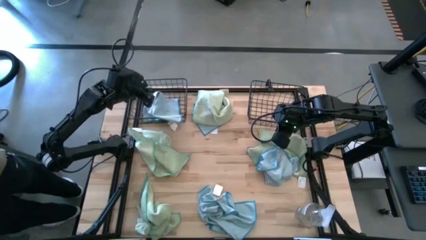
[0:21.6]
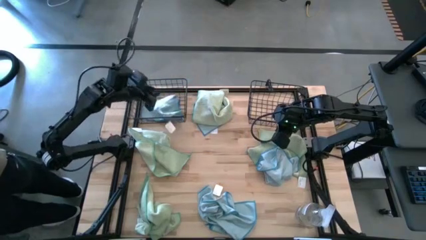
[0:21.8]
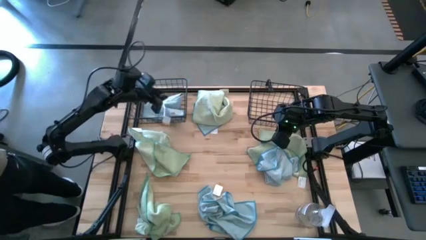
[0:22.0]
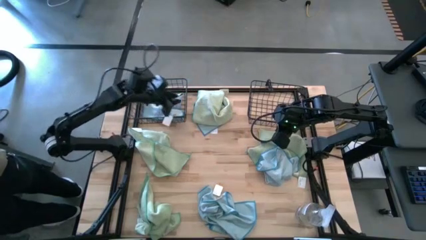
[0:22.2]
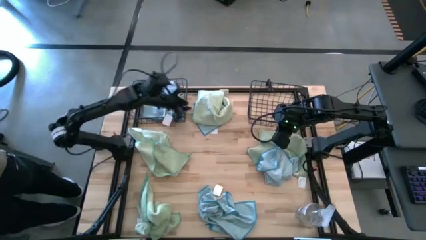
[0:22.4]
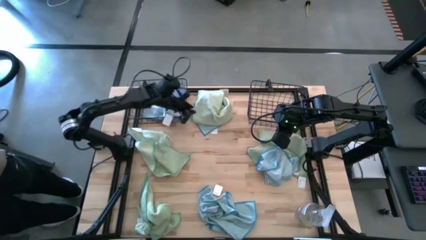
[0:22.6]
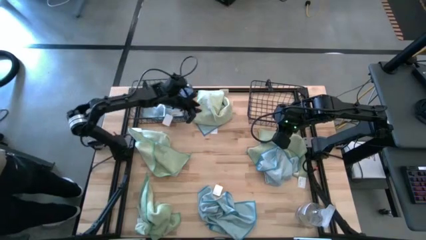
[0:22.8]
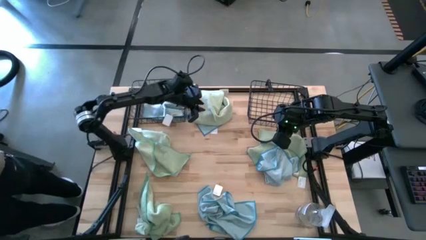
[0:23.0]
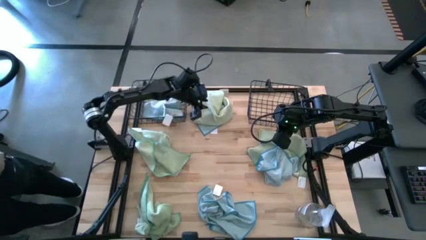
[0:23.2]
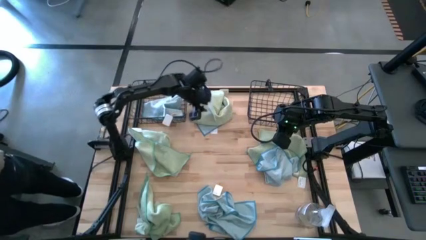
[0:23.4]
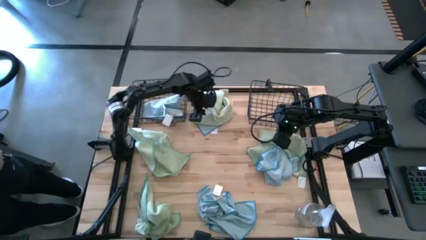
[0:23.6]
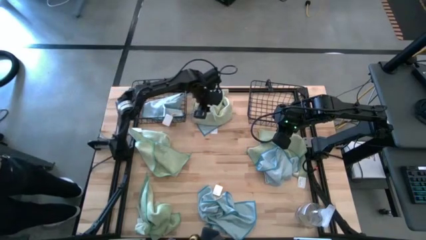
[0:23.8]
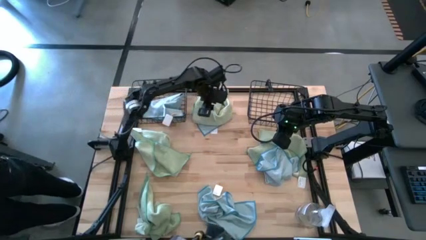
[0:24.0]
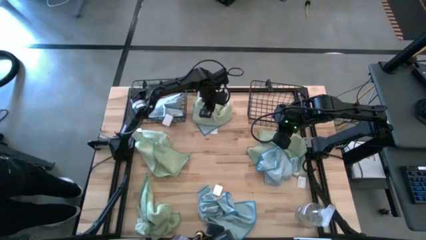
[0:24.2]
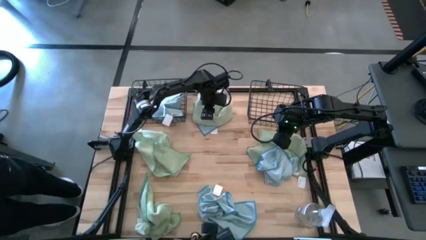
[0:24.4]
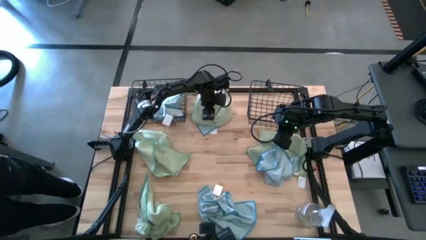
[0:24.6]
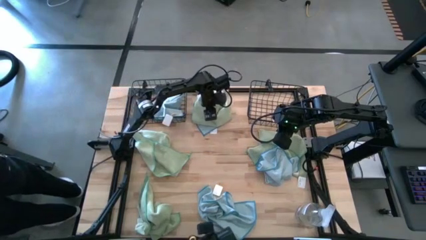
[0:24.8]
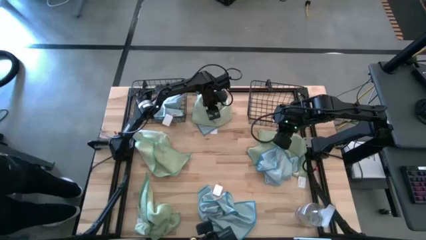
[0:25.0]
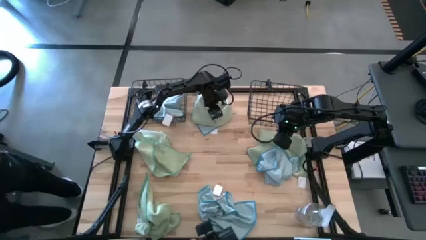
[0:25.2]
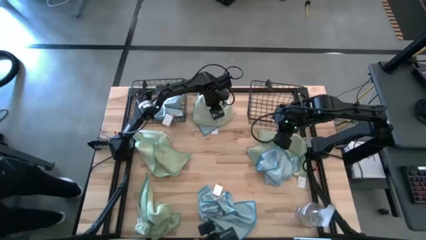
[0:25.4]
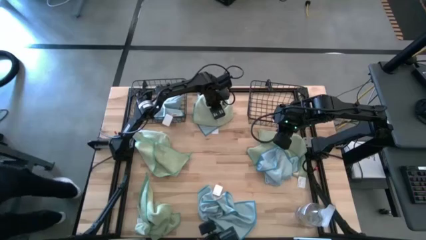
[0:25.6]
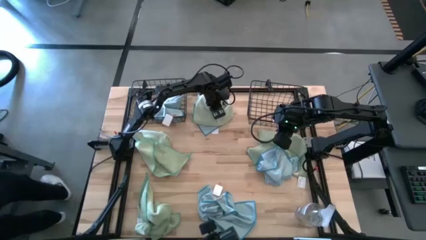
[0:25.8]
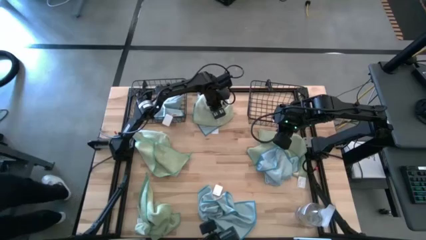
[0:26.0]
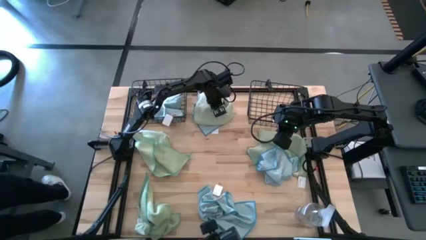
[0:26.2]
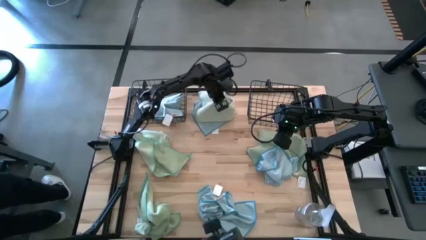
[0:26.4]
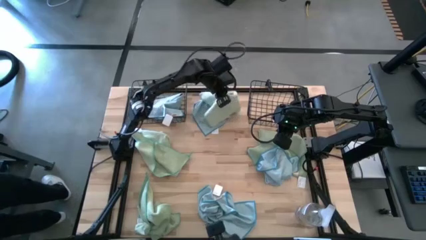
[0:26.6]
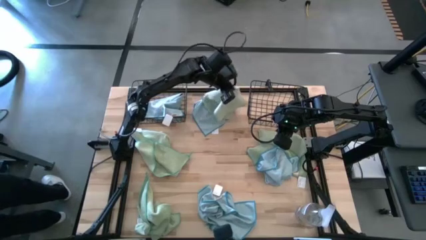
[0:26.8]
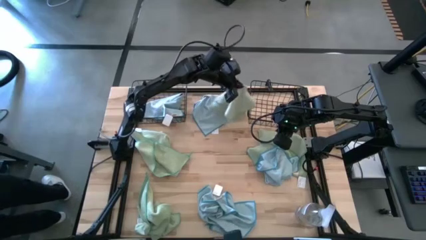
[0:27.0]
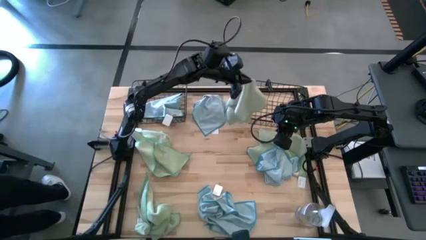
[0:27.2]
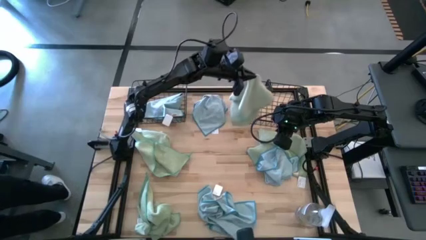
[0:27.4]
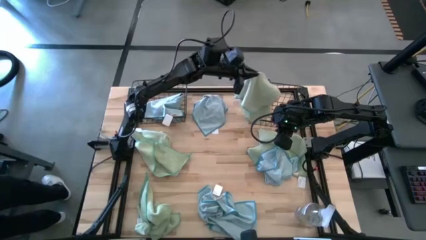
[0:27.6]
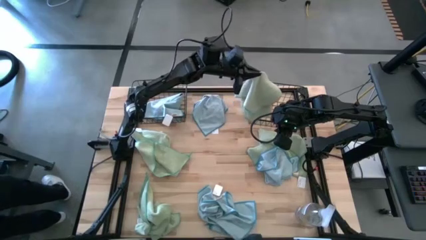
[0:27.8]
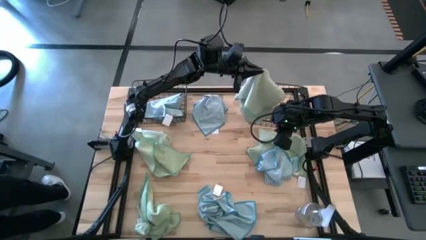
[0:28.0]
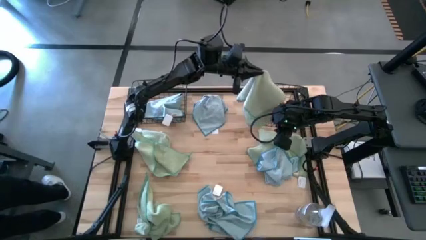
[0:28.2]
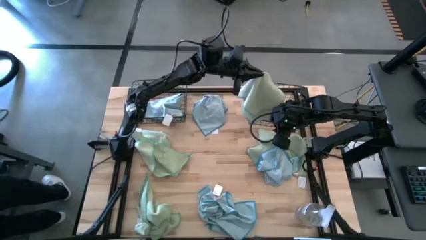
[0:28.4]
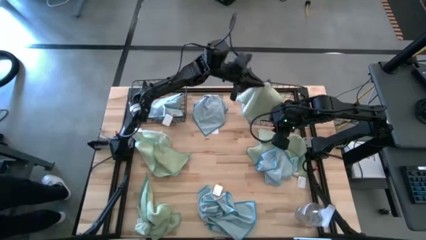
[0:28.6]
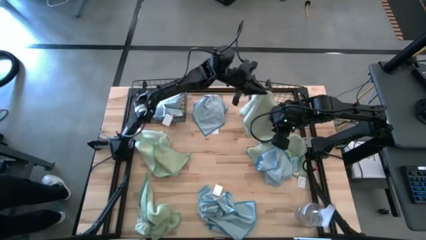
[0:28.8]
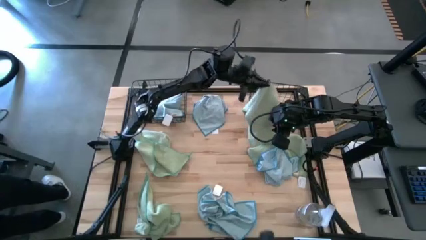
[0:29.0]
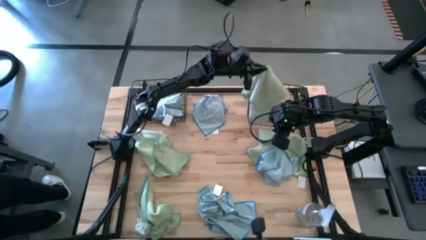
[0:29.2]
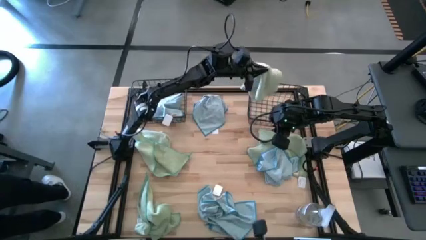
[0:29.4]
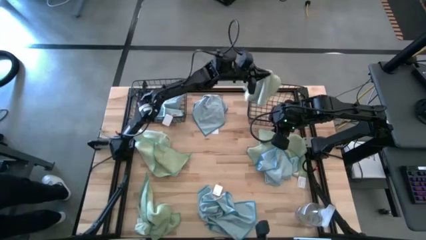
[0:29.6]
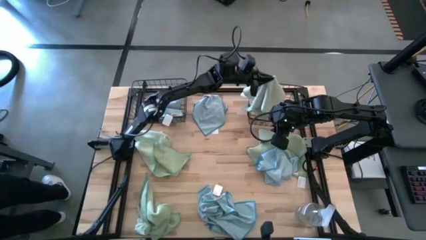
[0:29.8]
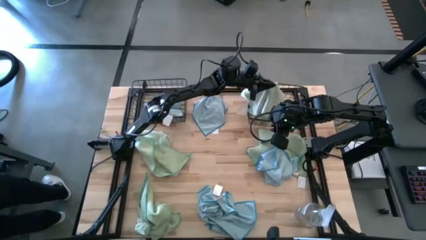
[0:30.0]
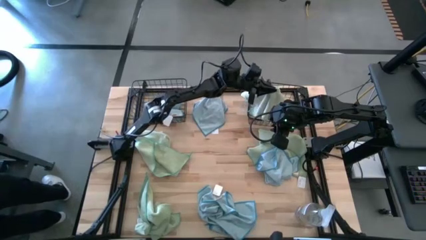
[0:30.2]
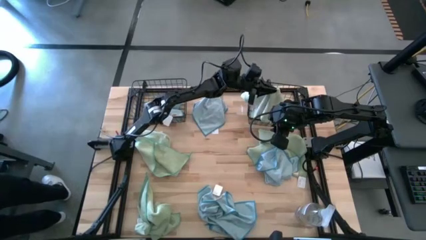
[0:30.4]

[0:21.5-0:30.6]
Task: Sort microfiber towel by color & place in baskets
Put the green microfiber towel into the right wire basket

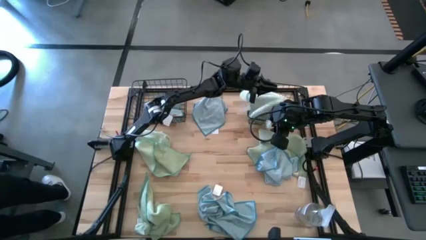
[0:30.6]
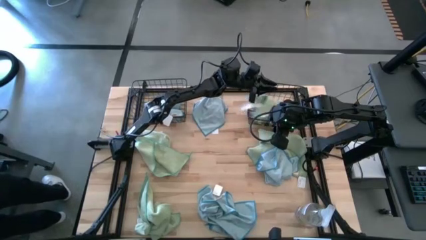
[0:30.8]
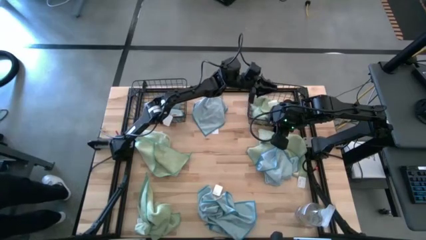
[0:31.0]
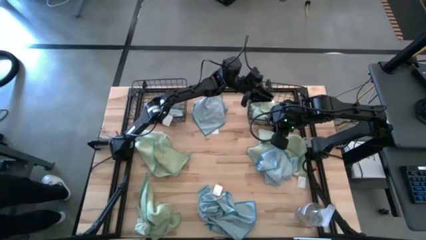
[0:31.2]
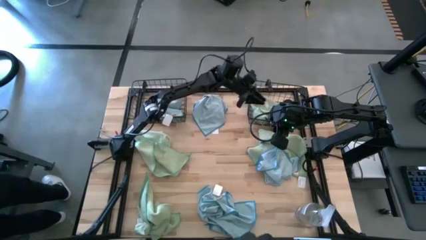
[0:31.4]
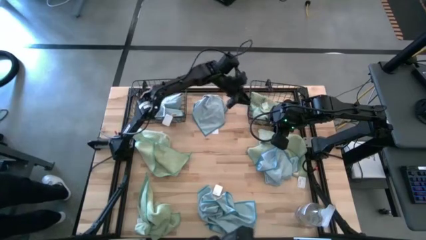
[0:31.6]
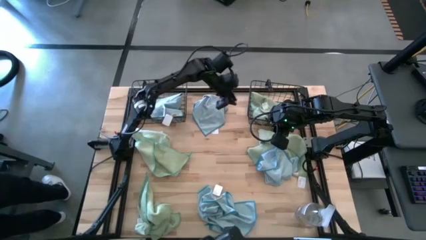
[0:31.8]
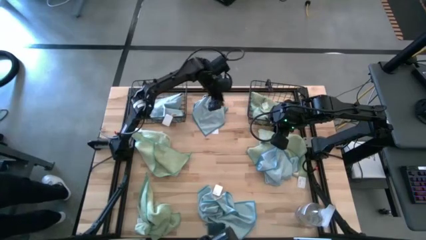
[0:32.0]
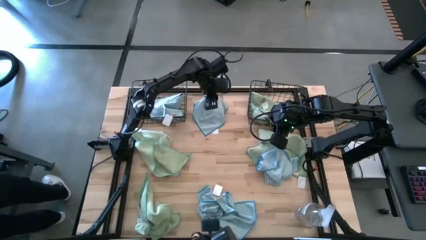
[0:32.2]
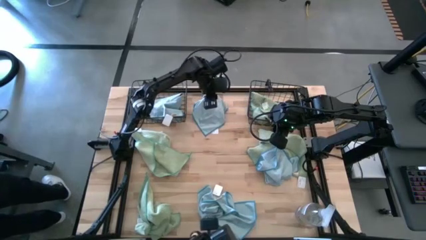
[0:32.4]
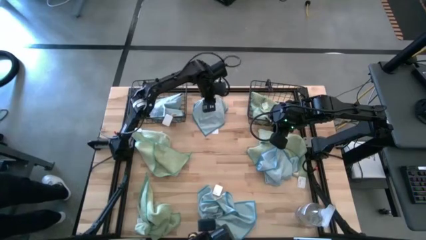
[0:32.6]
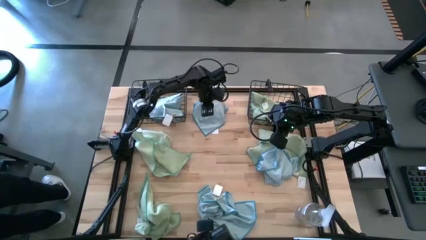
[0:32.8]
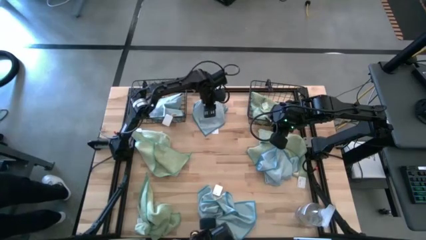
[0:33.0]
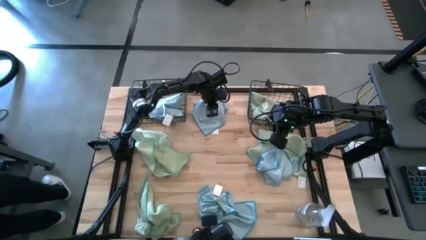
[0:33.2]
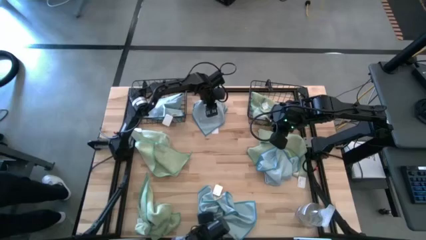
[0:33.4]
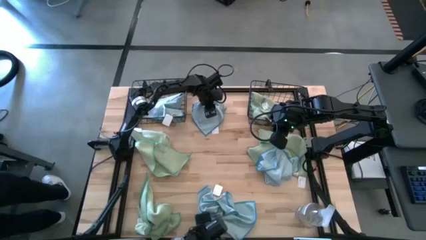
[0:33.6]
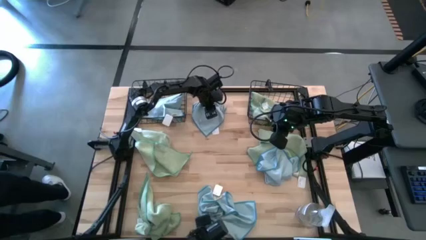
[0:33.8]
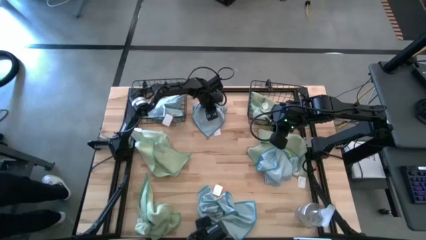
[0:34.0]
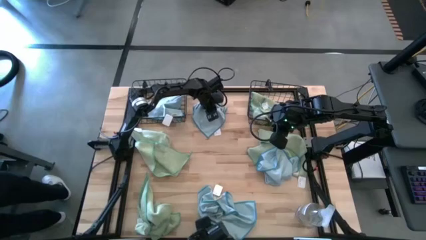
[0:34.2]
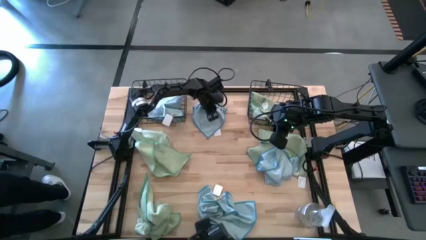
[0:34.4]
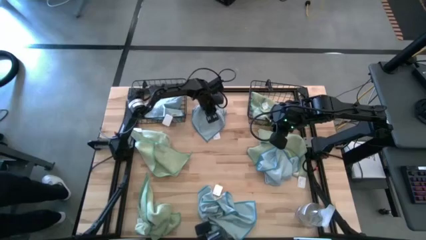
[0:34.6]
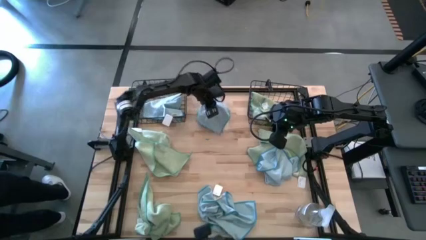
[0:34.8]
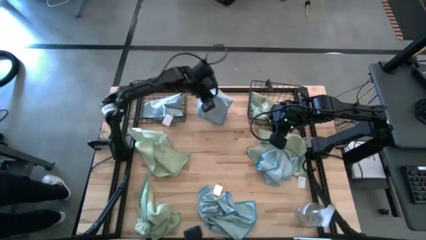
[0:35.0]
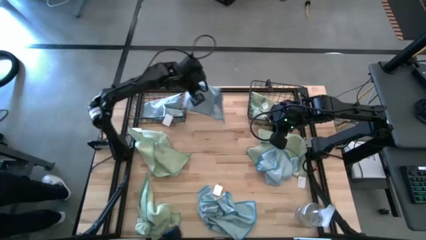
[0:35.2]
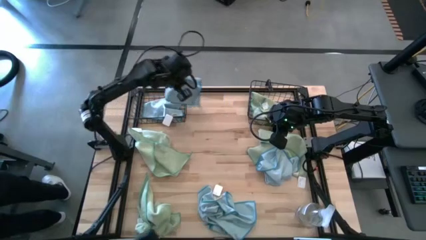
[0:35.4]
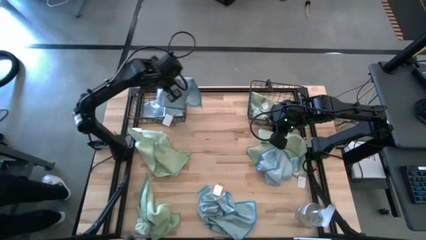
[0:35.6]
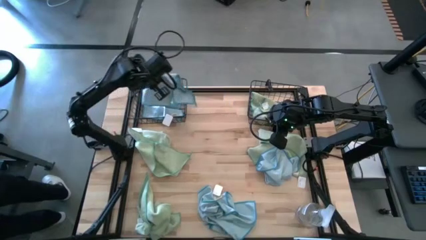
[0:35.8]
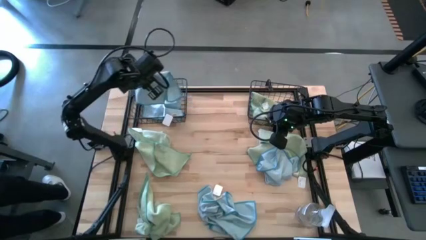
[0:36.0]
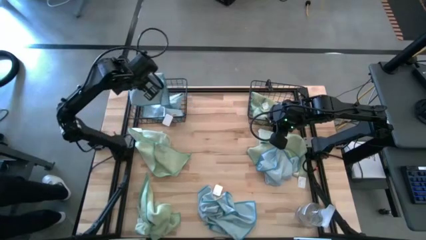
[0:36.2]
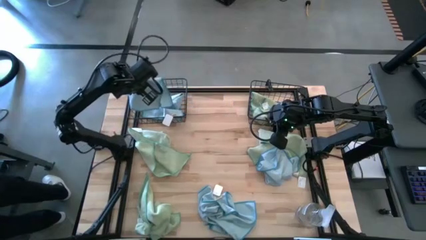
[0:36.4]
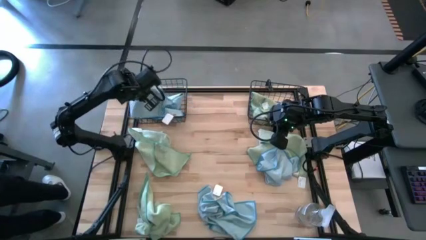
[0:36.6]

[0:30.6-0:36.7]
Put the blue microfiber towel into the left wire basket
